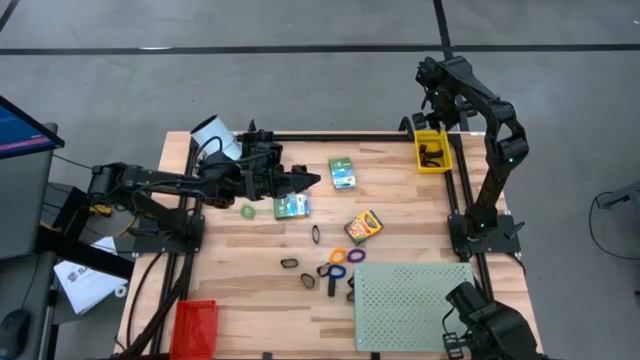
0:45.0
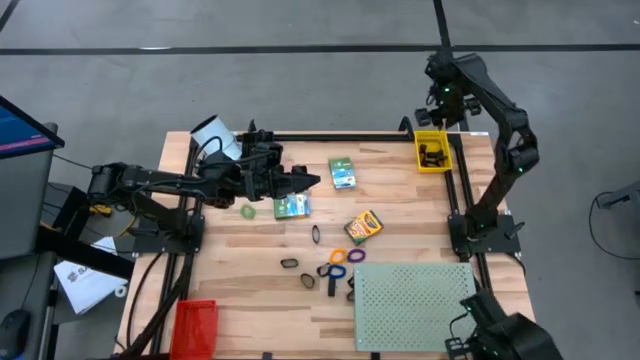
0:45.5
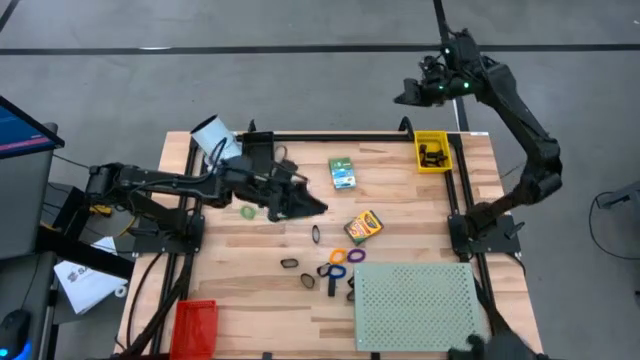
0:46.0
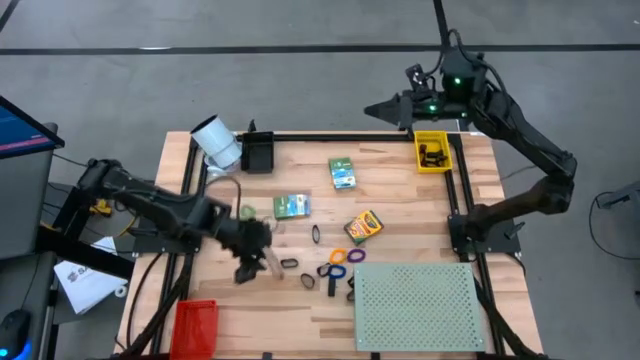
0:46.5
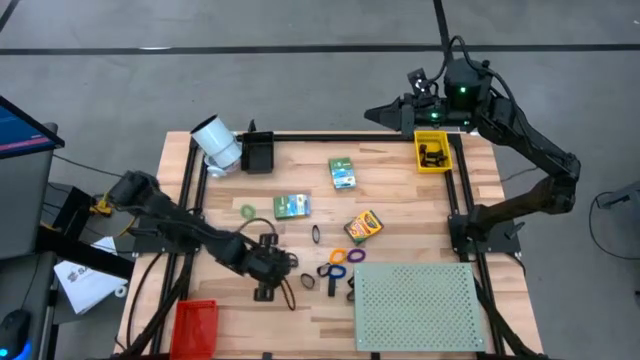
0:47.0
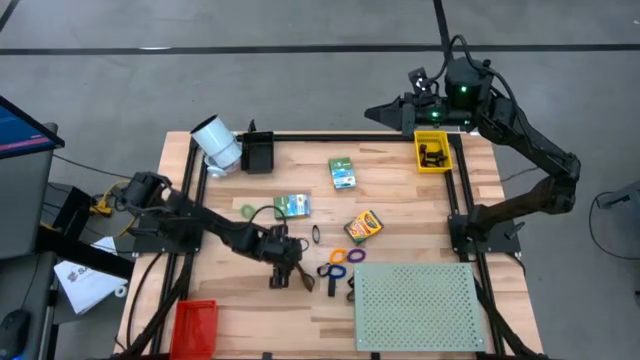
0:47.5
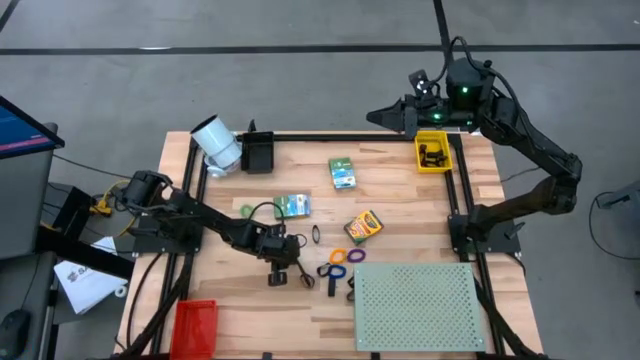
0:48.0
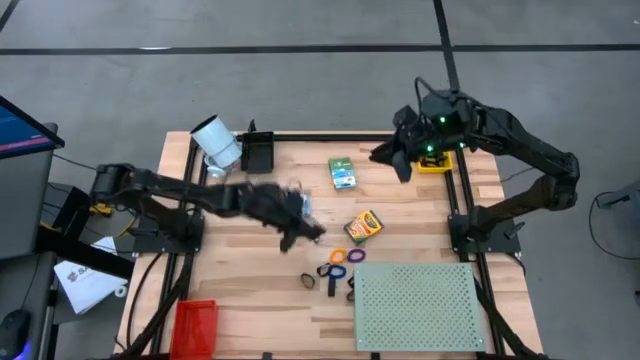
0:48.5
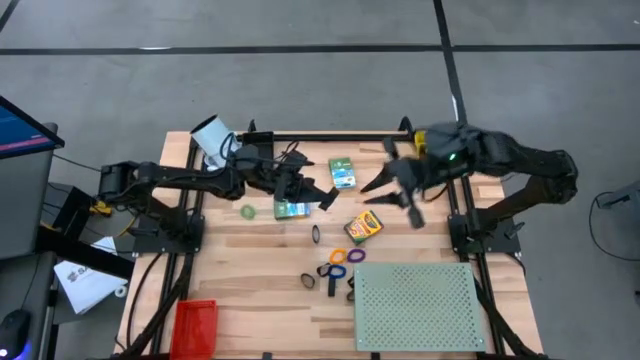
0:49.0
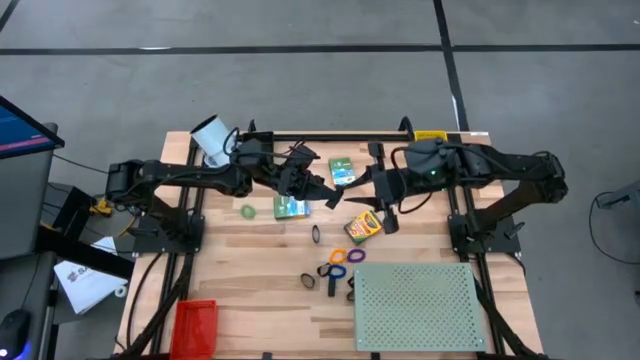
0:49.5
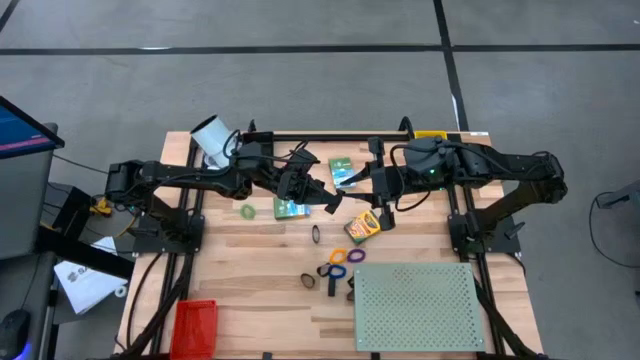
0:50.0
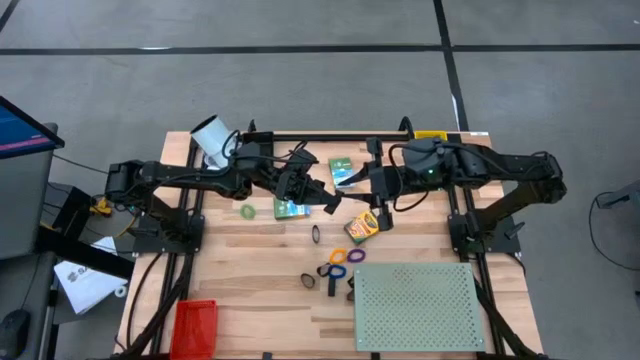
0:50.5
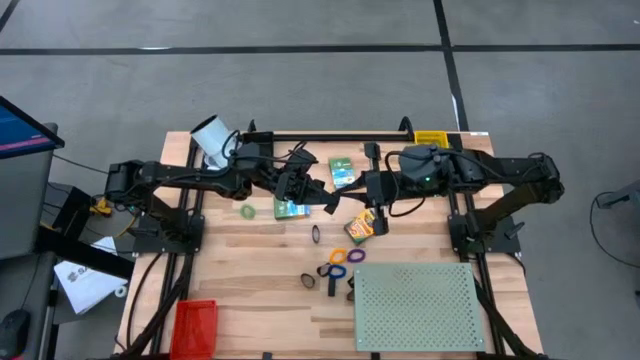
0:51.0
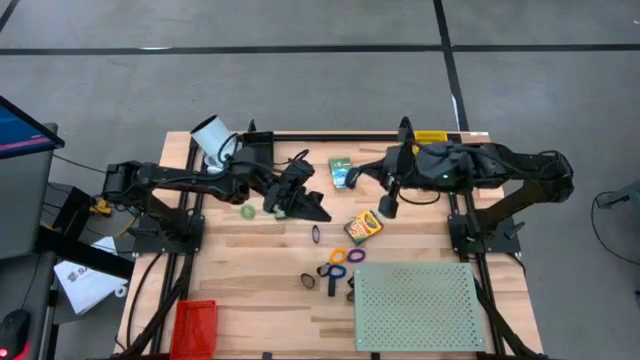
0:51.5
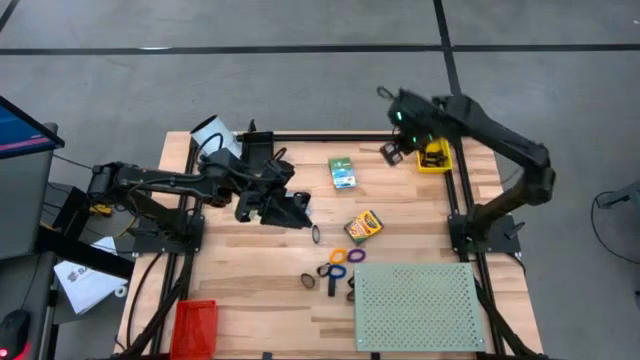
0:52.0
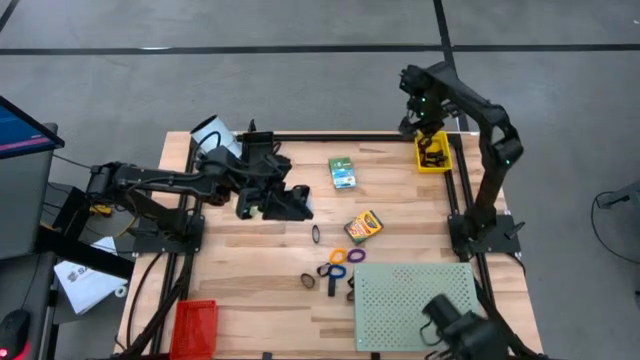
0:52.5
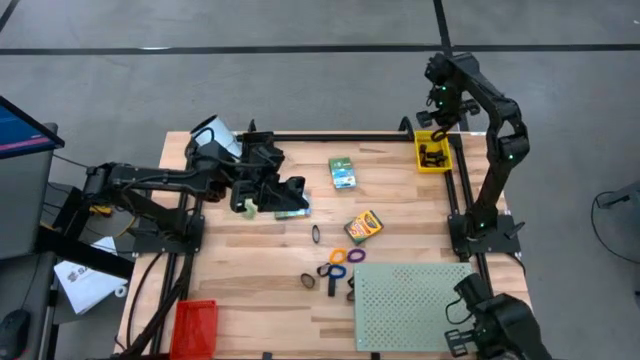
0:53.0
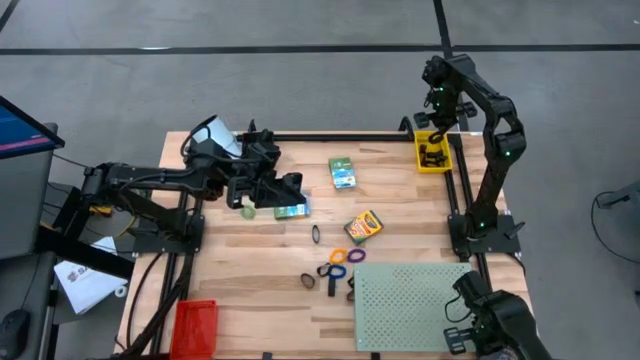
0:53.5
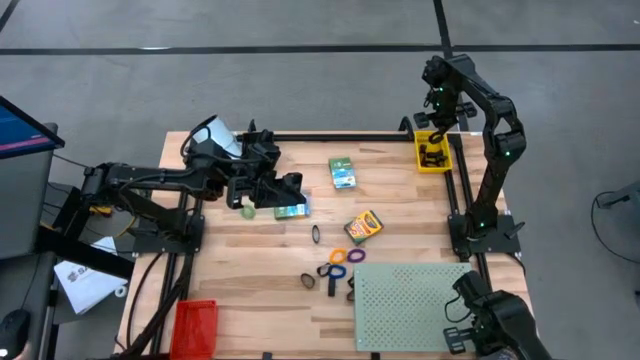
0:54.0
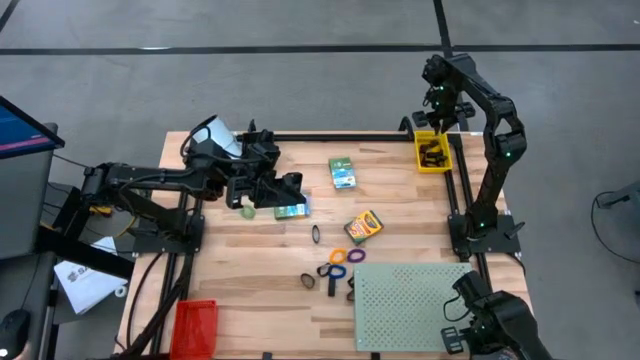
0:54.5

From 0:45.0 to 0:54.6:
Task: Pick & Place Office Desk Supplies
Put the black rubber band into the yellow bin

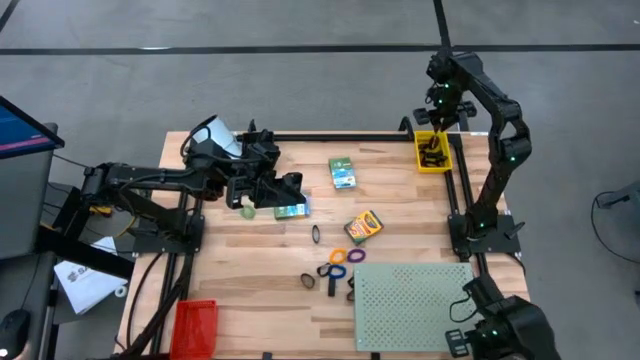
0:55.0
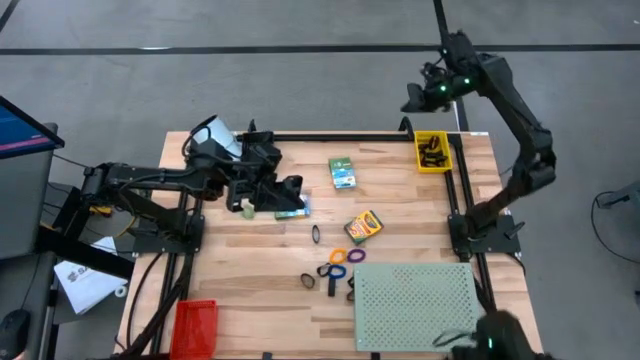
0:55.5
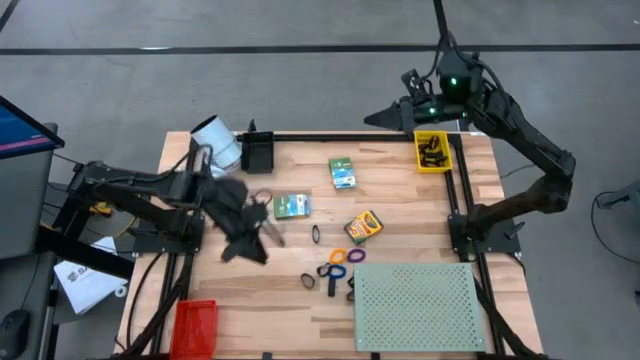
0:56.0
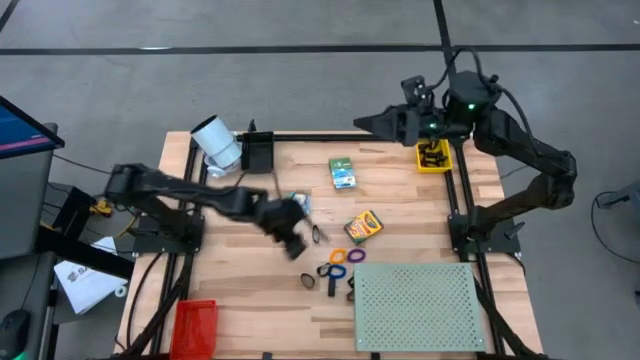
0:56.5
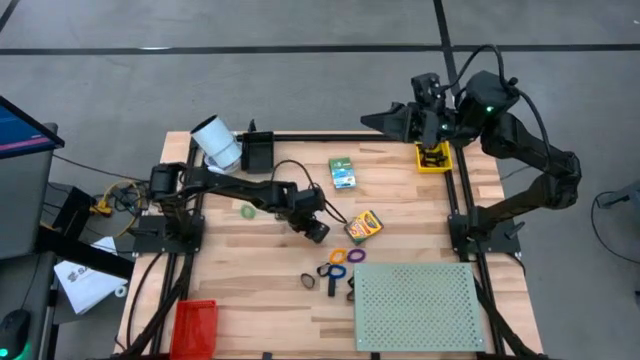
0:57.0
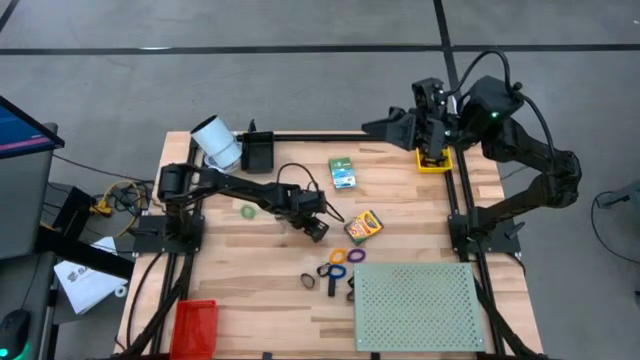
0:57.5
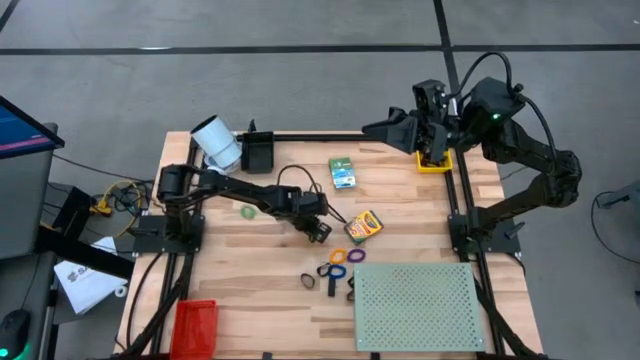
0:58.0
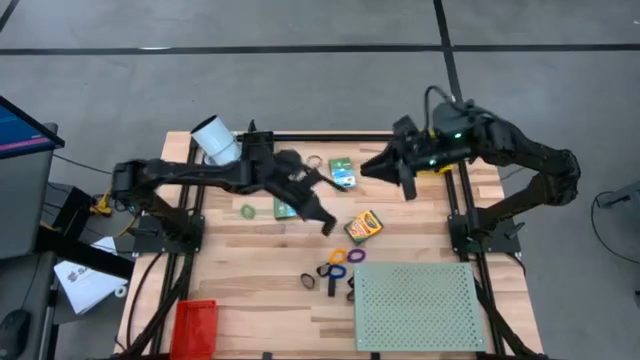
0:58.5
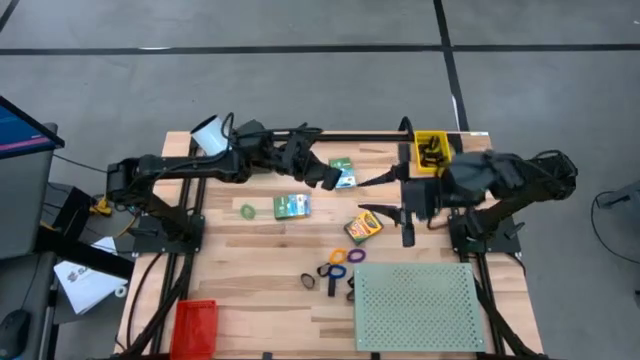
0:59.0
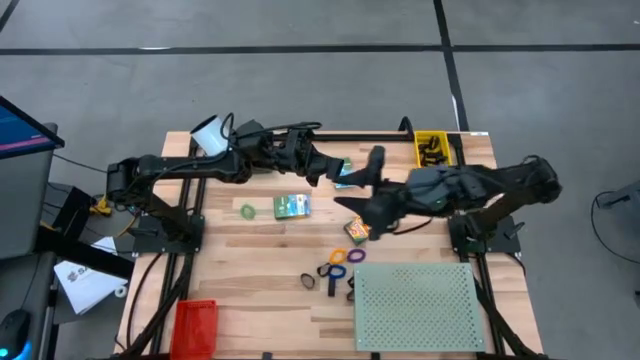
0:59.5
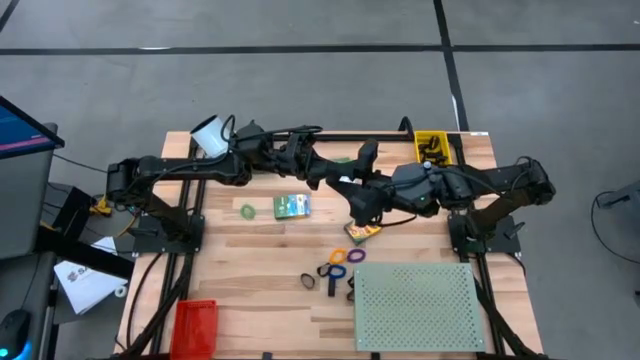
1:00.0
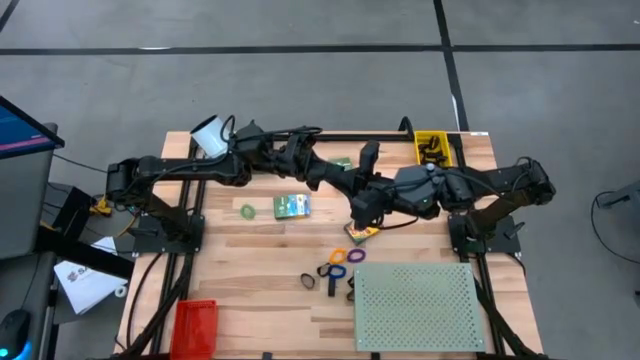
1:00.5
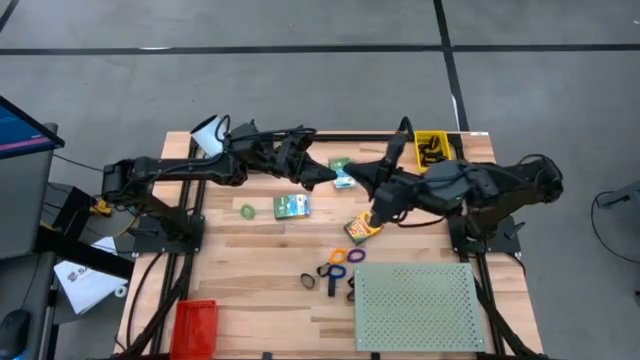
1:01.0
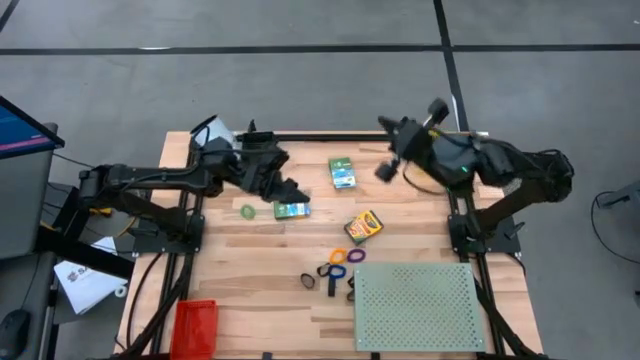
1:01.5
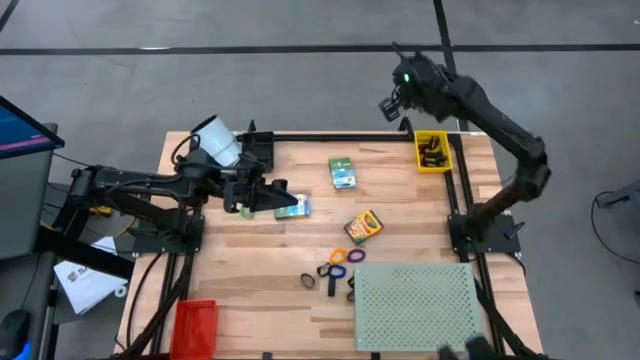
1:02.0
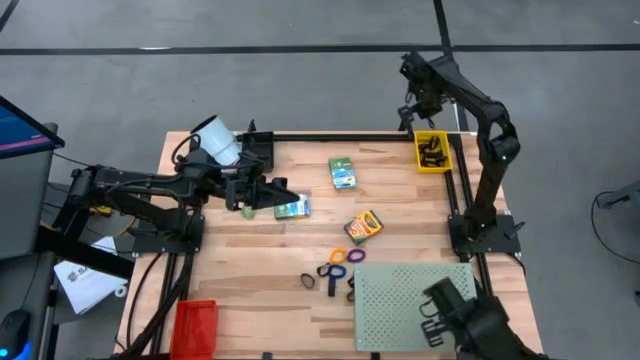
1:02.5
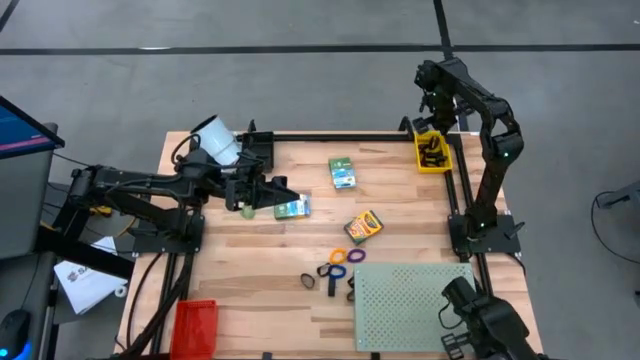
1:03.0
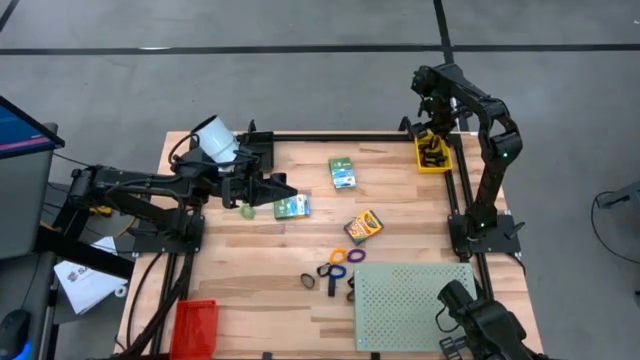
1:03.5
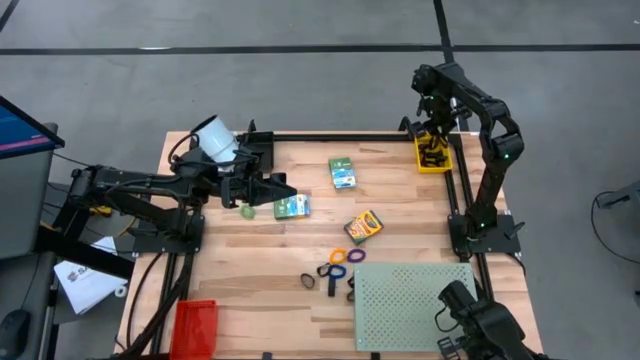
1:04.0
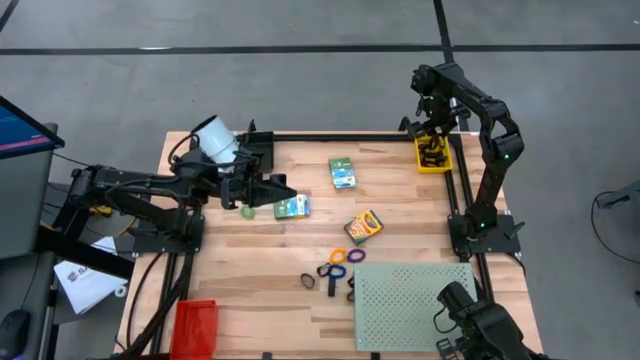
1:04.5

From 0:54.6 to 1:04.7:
Put the black rubber band into the yellow bin

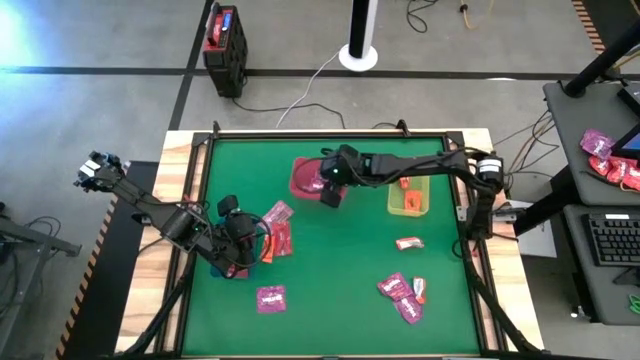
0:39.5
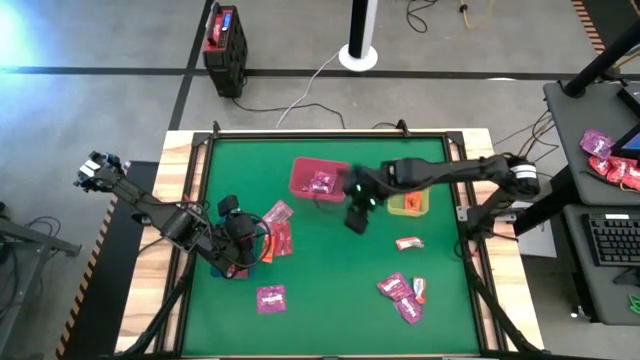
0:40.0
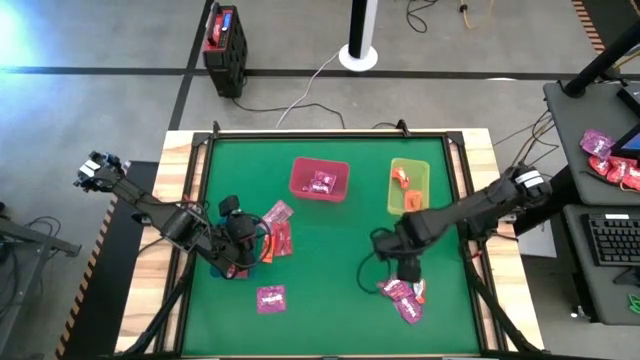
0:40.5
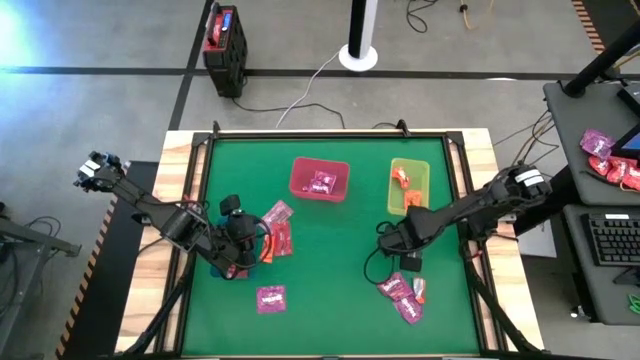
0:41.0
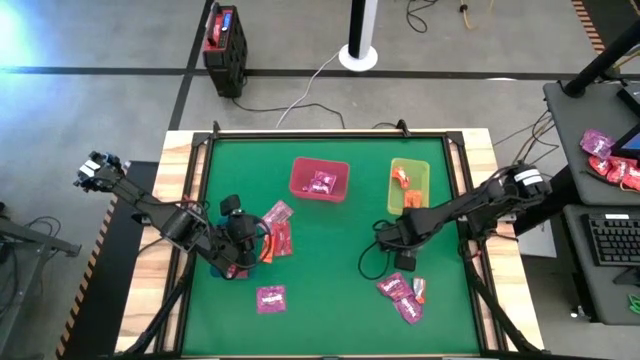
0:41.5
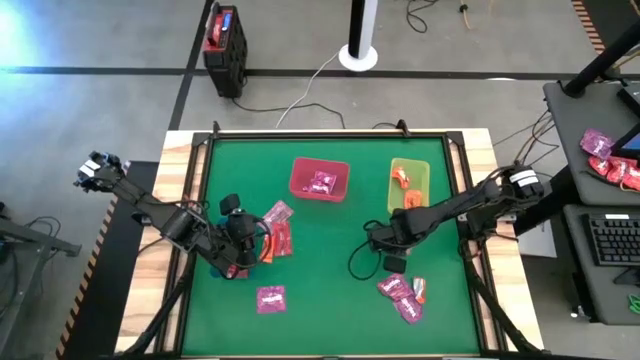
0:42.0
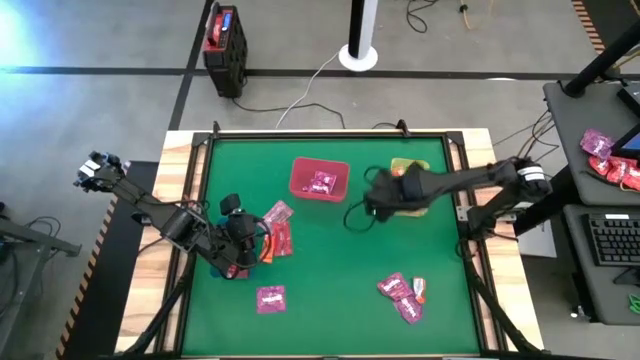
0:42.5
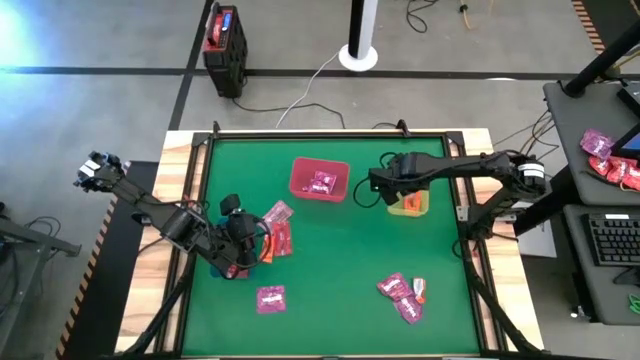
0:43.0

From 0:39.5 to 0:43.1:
Task: Sort candy by brand, put in halloween buckets
Put the orange chocolate into the yellow bin
